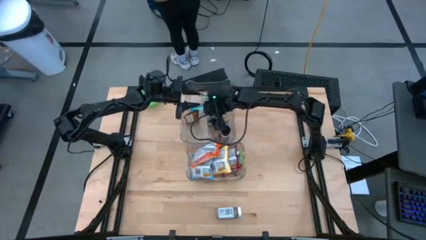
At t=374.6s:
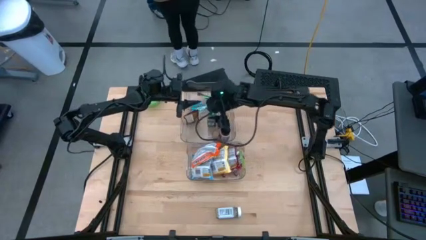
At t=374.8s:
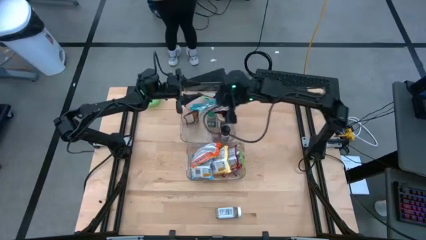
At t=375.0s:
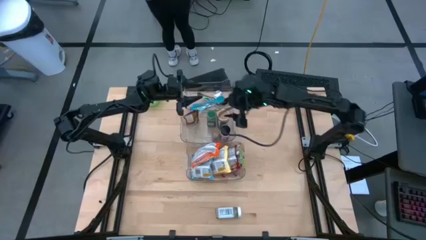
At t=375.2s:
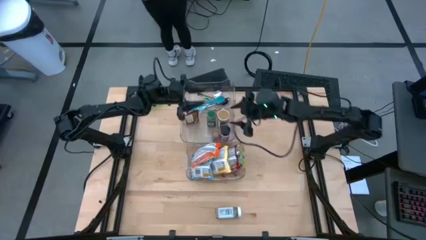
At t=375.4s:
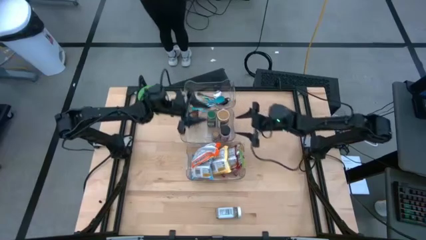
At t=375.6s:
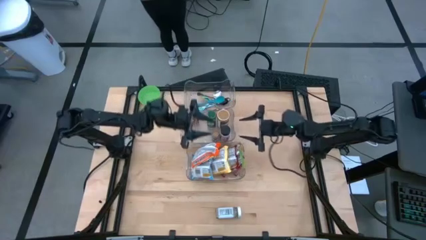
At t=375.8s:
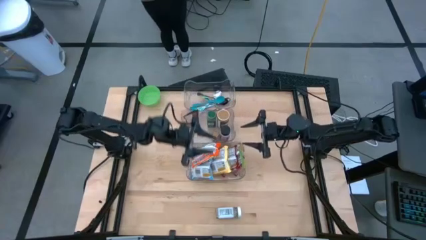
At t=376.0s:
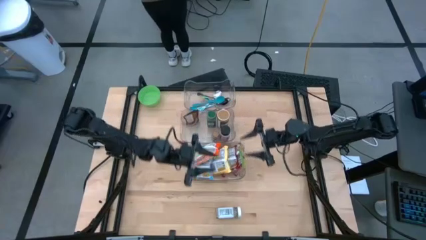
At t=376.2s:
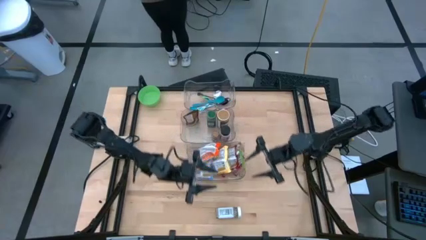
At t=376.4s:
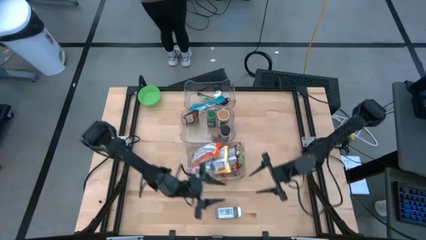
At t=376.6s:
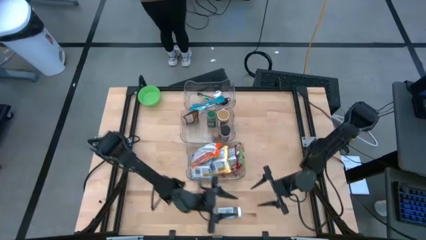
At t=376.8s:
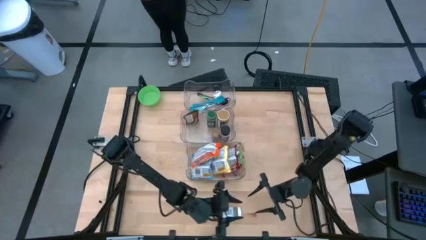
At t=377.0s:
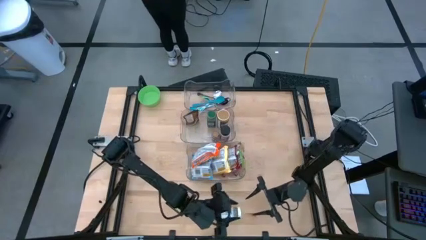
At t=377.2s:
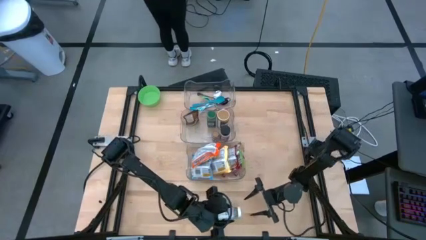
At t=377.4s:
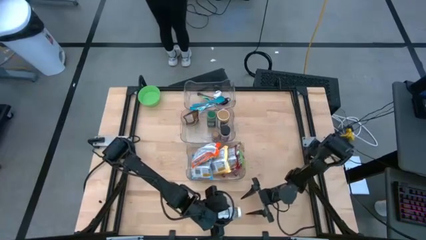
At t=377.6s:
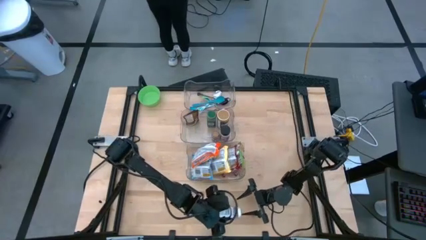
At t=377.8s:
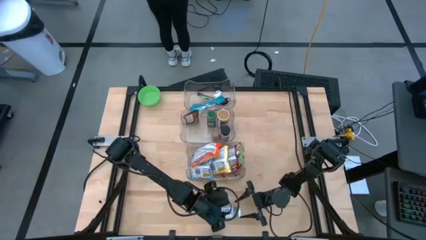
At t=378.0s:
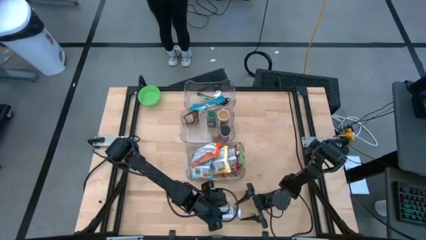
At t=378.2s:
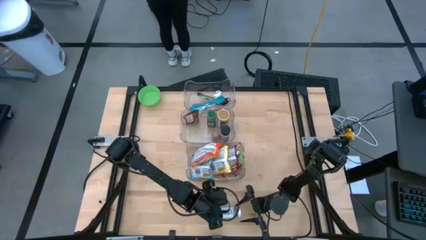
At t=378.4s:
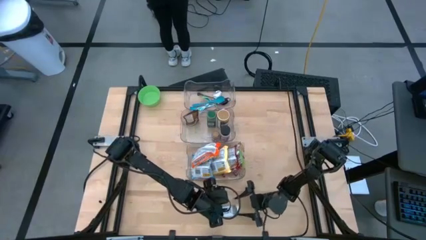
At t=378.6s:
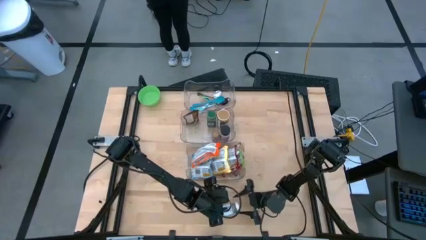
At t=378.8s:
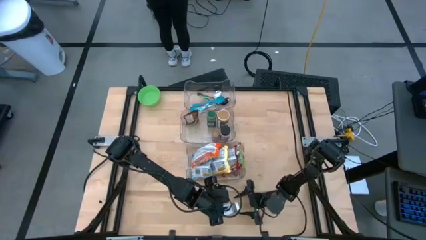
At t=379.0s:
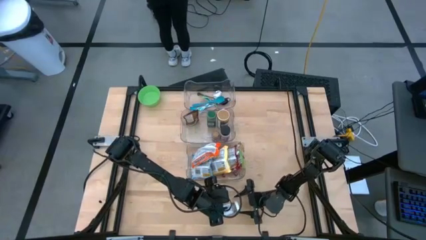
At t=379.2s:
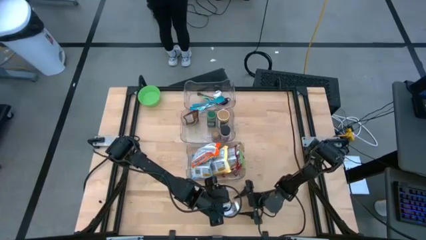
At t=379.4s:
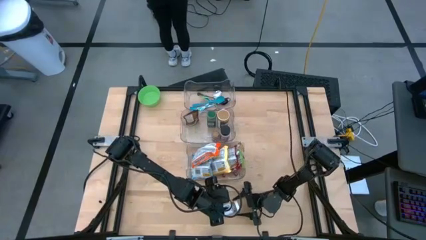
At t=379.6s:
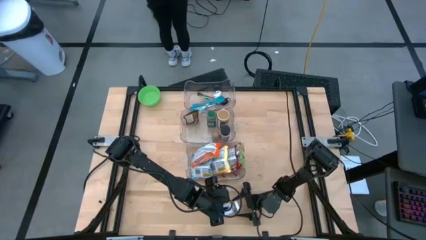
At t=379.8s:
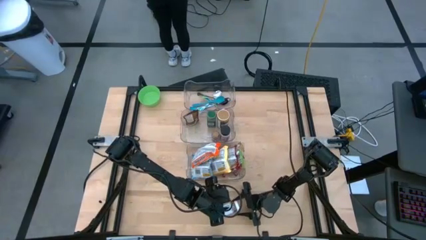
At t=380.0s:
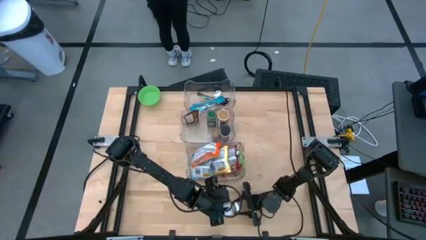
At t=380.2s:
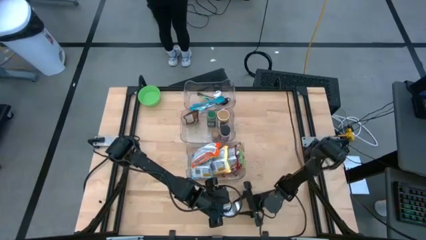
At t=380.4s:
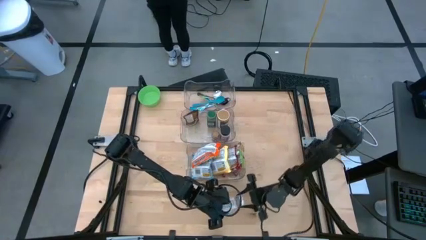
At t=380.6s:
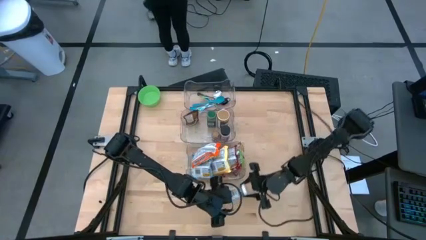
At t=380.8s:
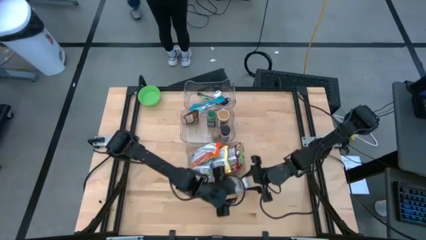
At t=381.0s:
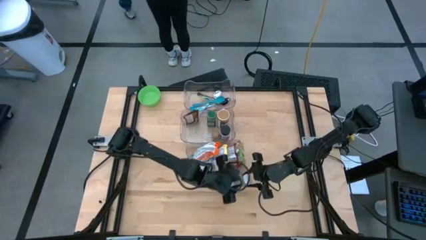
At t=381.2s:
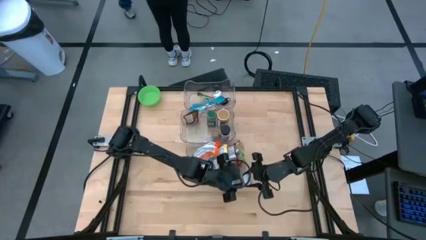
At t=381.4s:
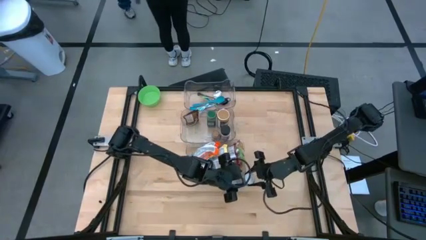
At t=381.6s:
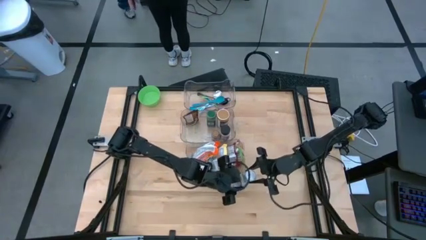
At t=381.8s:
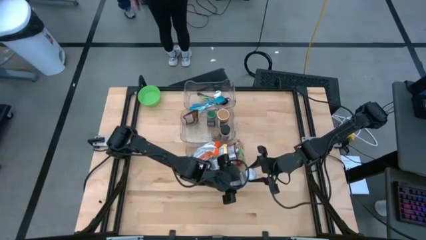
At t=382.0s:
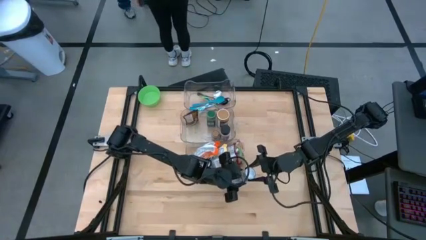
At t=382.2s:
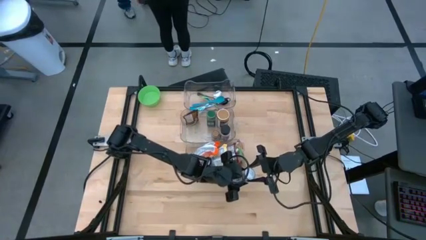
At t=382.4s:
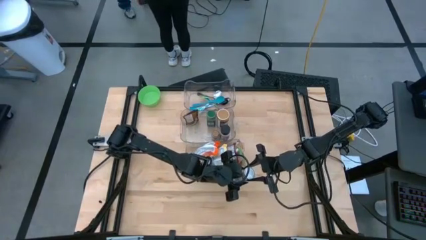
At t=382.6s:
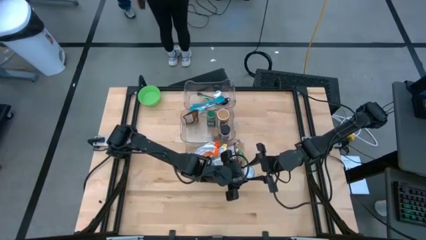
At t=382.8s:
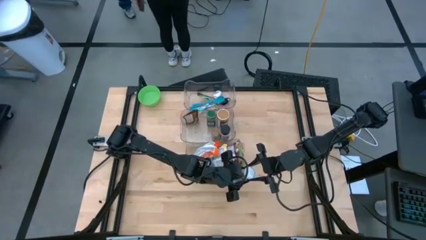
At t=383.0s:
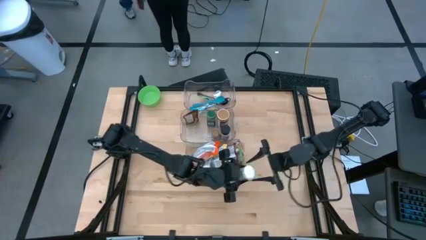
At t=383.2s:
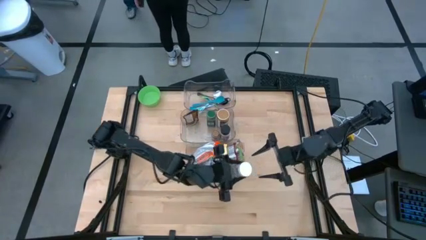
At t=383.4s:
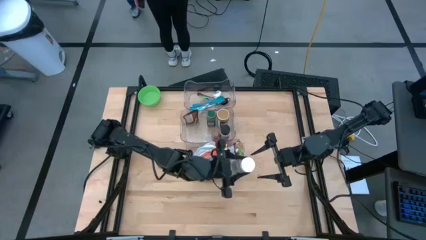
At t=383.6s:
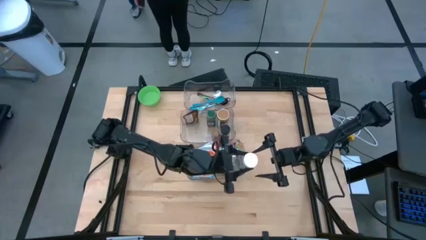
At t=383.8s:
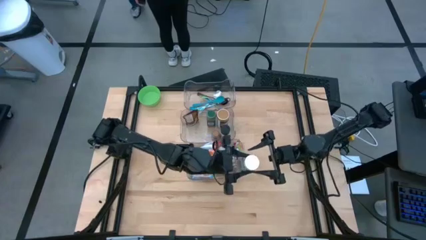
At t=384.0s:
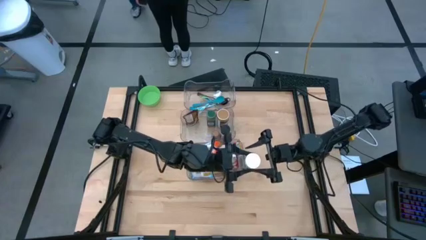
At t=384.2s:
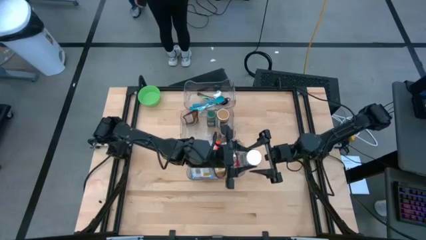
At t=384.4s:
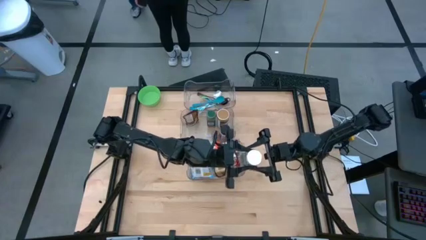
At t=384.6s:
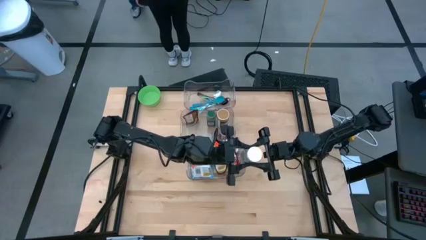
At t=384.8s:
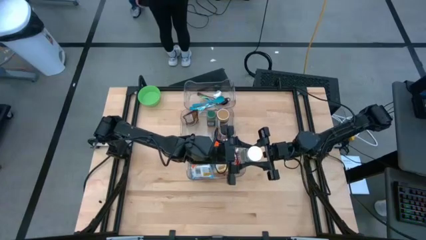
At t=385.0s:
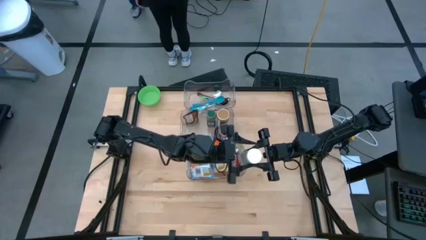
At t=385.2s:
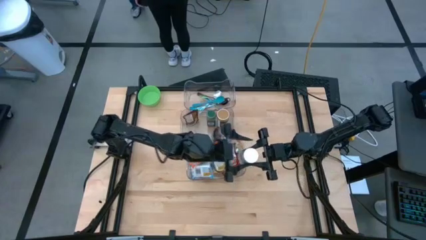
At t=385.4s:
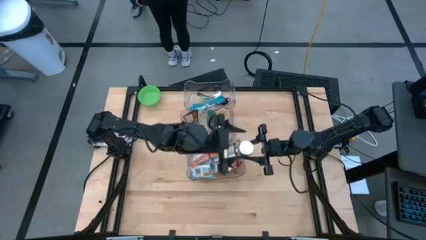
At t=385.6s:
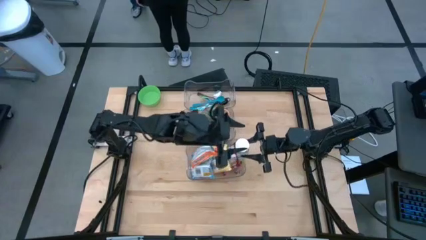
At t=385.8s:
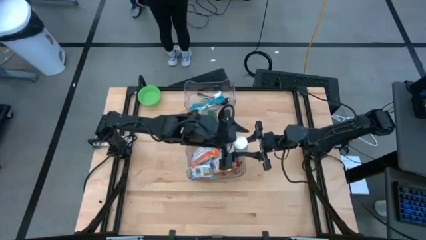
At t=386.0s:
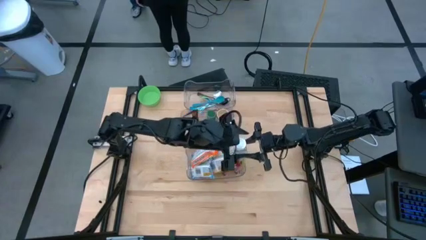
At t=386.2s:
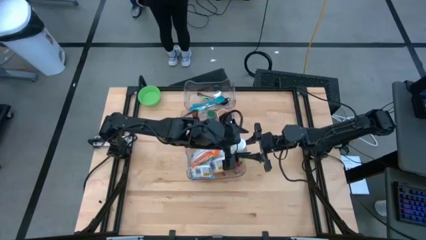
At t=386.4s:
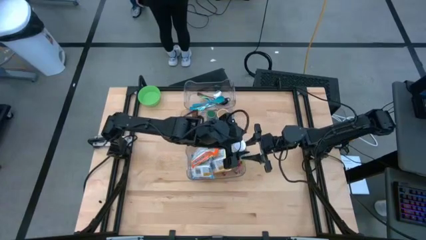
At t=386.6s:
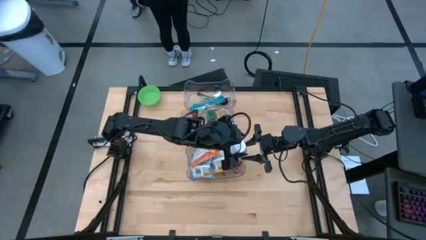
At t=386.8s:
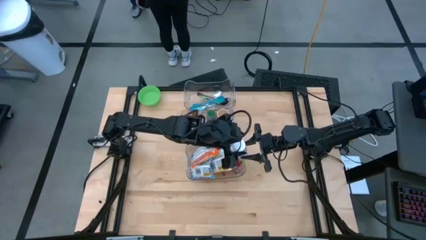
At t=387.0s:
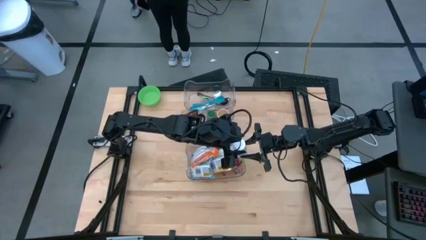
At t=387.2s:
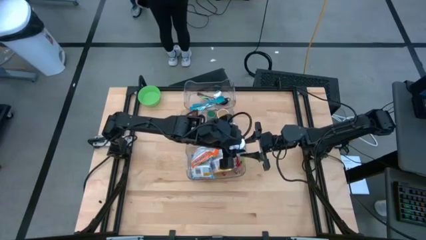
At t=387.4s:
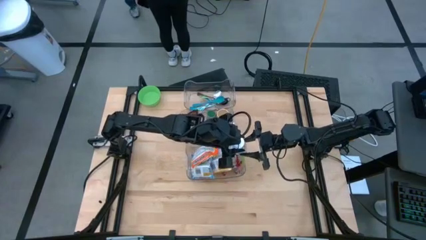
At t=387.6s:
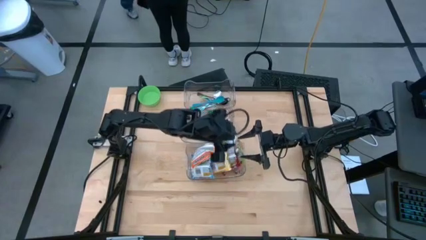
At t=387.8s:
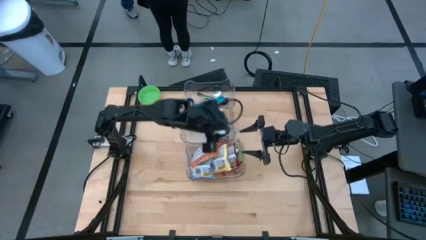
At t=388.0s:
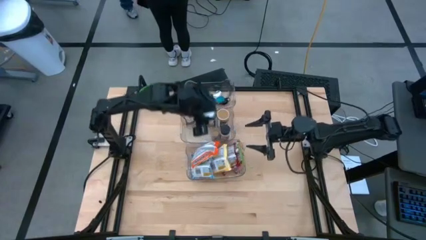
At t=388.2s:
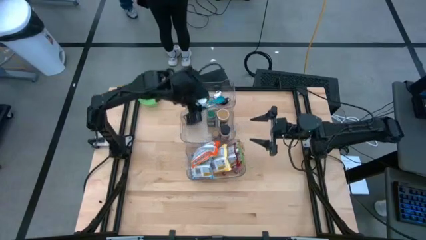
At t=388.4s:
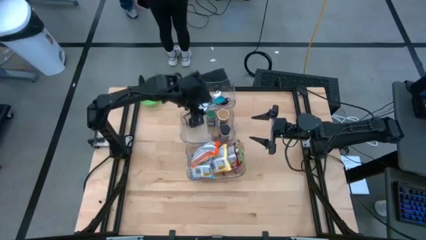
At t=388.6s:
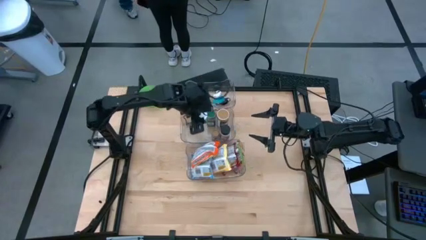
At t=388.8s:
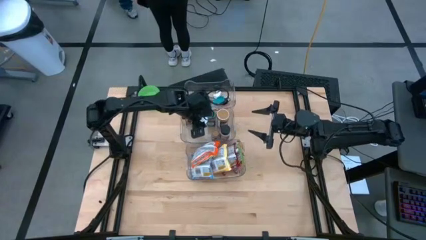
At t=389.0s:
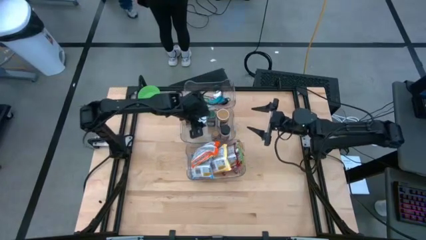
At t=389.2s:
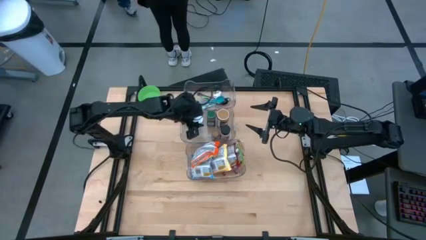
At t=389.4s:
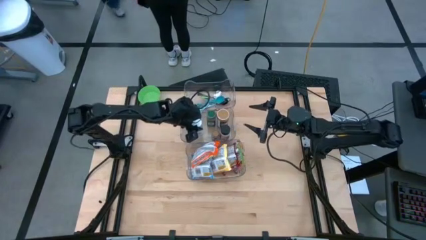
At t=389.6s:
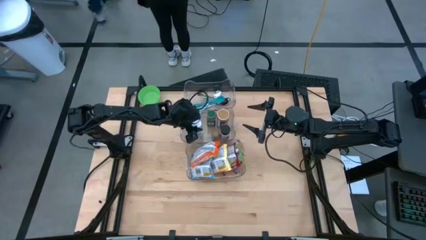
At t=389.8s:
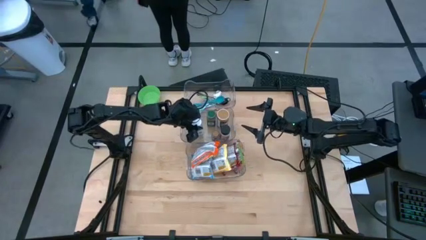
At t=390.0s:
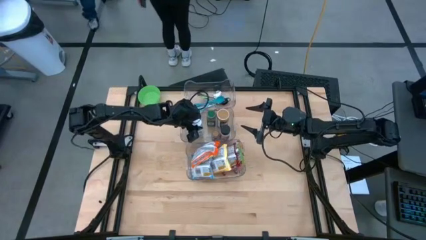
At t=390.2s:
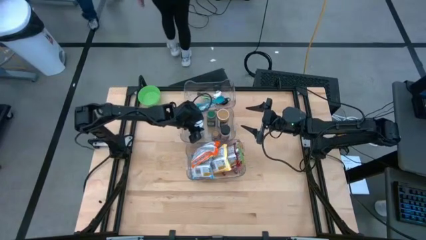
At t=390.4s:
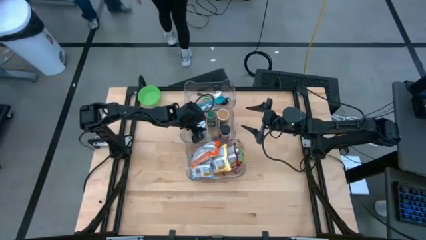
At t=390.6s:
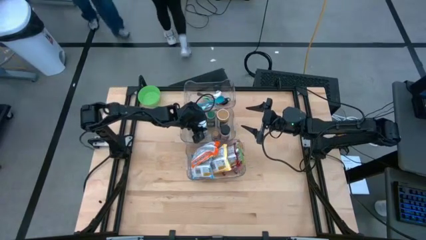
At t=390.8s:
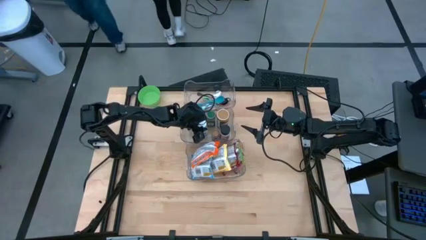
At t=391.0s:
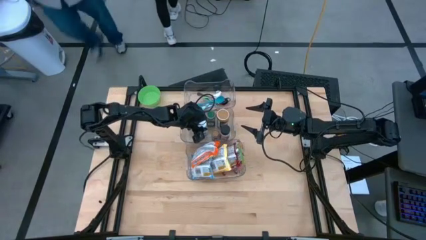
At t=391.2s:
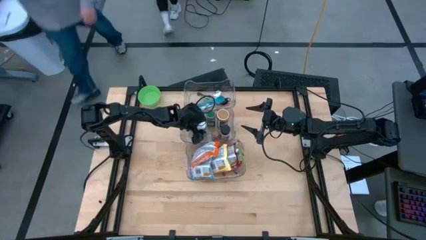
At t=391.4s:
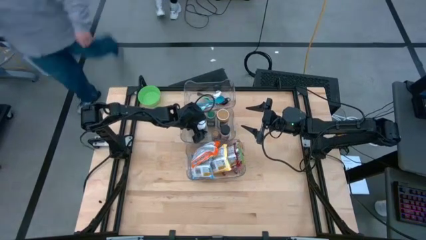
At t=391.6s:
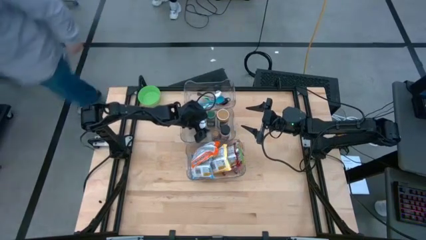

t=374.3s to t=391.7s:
Task: Pick & Place Food Item
Put the white seasoning bottle into the middle transparent bin
